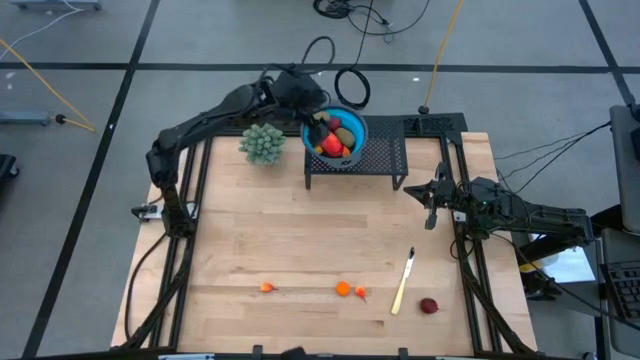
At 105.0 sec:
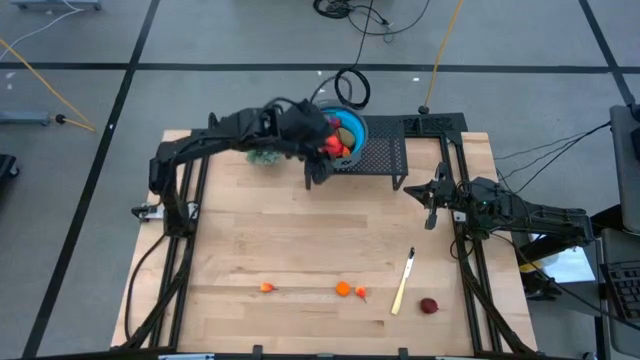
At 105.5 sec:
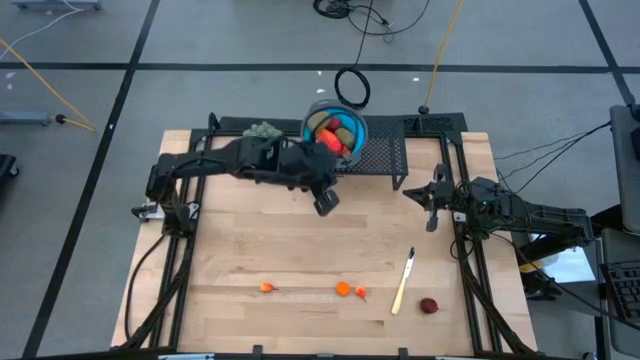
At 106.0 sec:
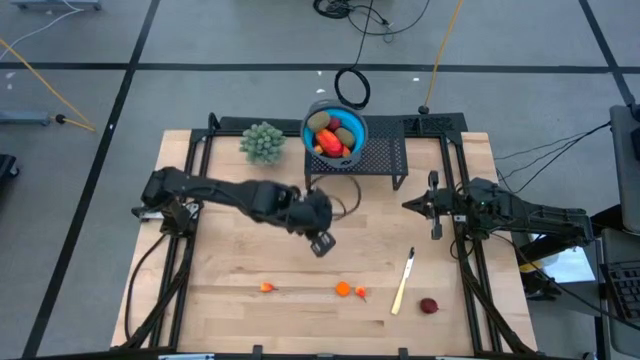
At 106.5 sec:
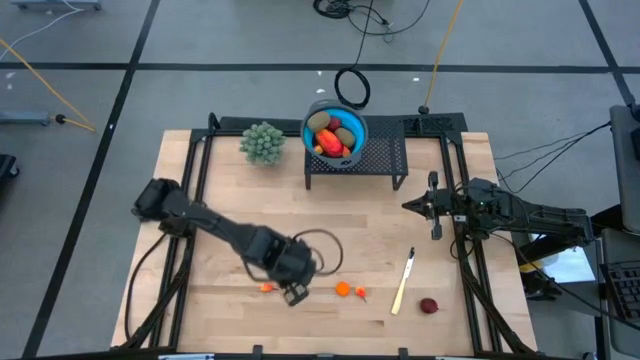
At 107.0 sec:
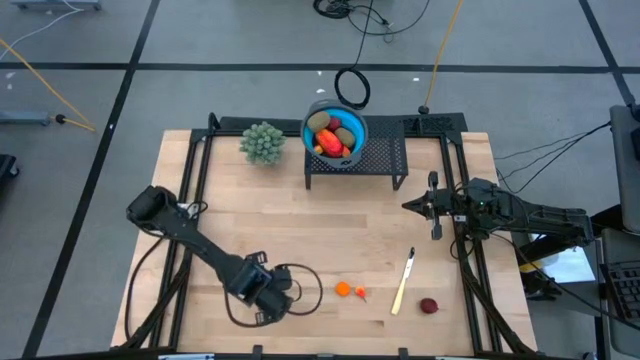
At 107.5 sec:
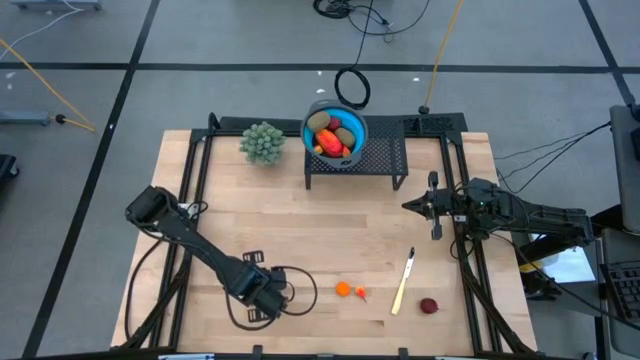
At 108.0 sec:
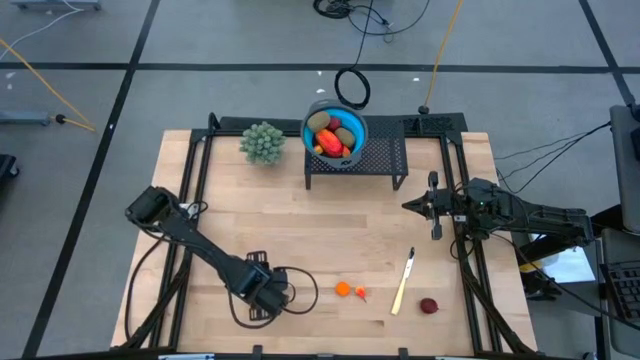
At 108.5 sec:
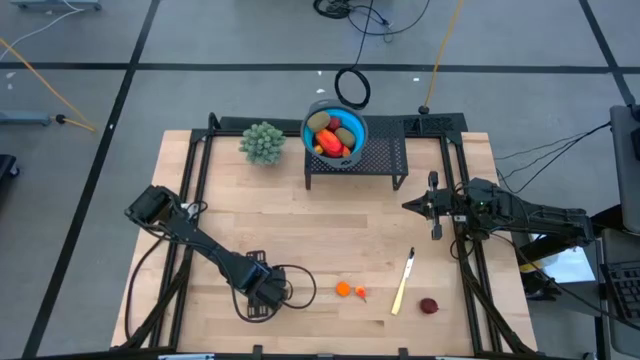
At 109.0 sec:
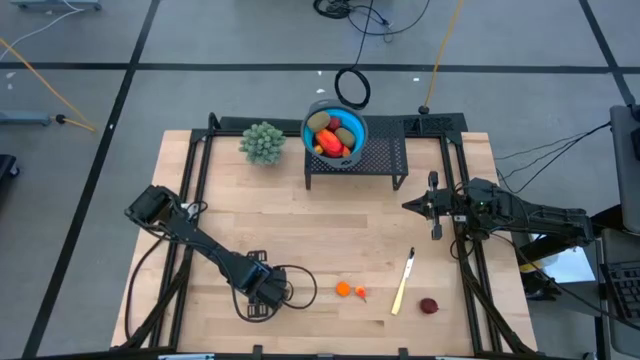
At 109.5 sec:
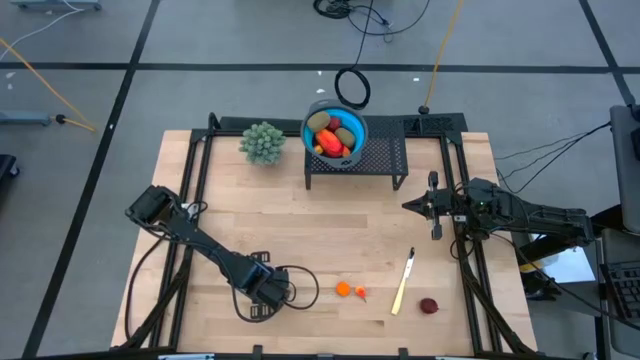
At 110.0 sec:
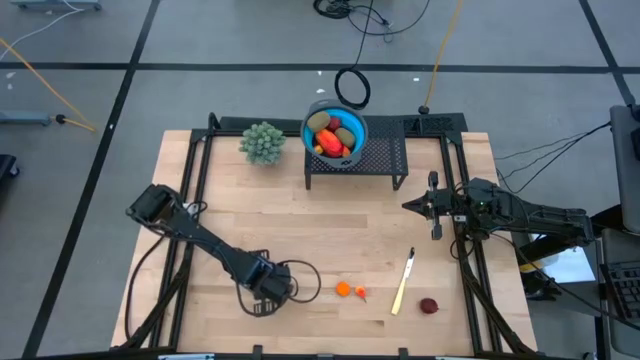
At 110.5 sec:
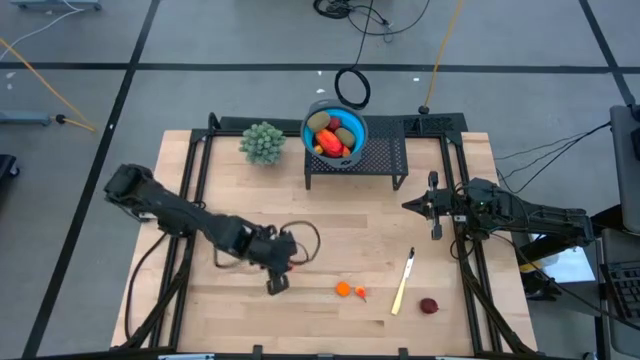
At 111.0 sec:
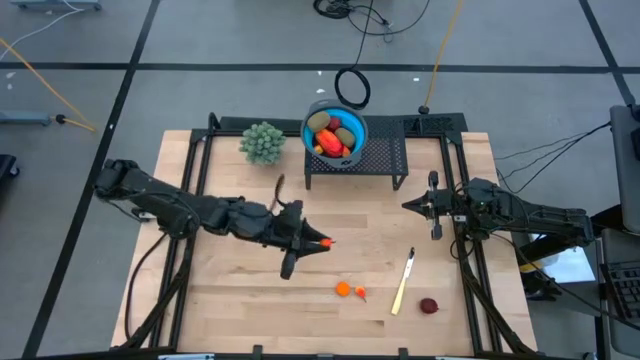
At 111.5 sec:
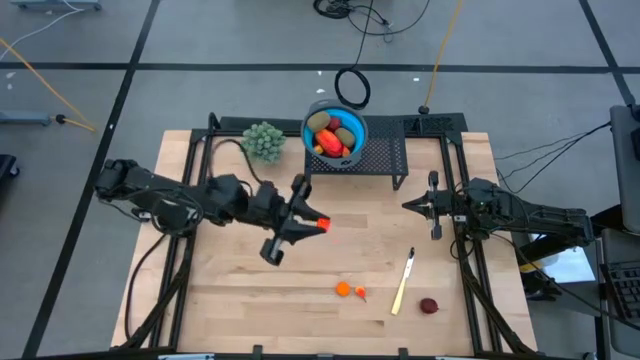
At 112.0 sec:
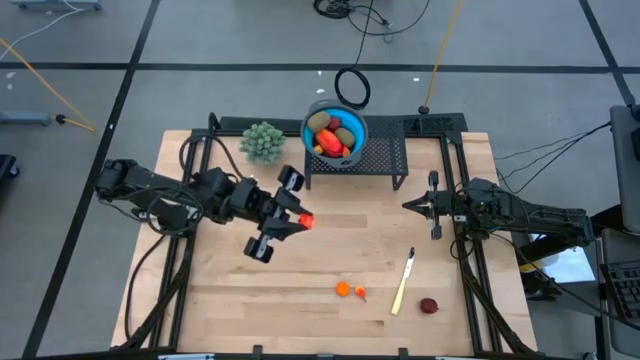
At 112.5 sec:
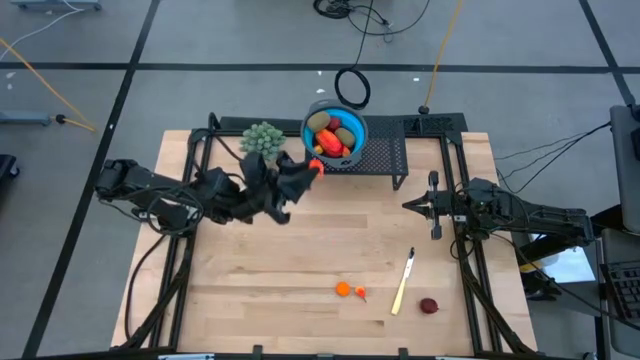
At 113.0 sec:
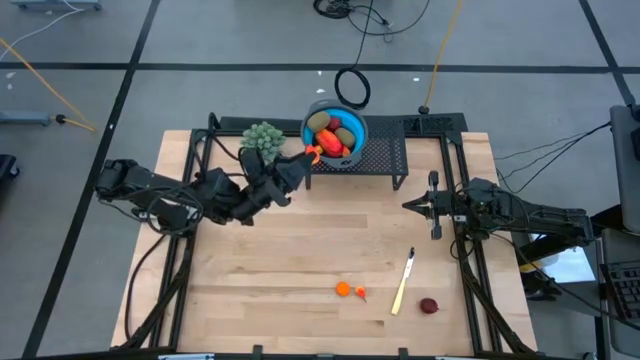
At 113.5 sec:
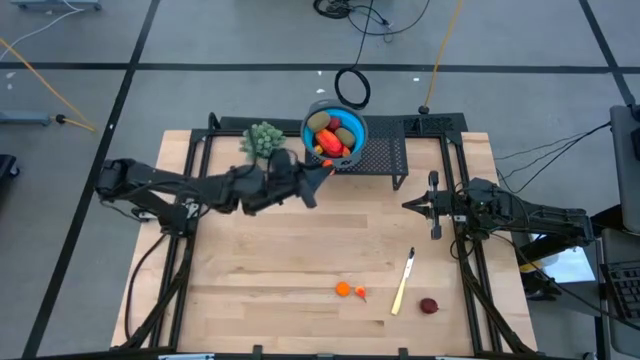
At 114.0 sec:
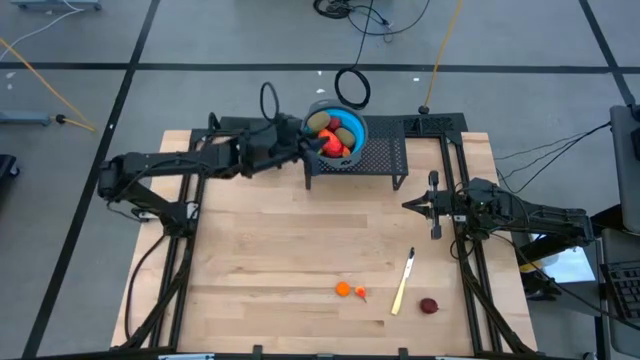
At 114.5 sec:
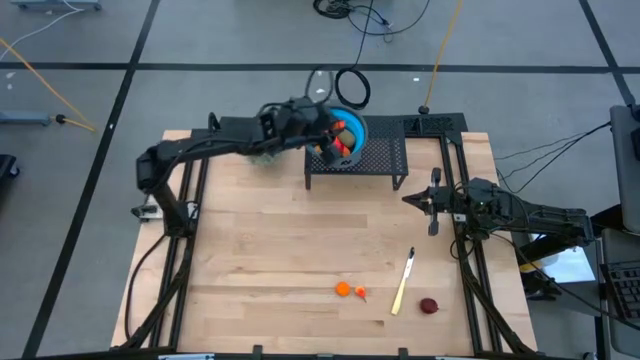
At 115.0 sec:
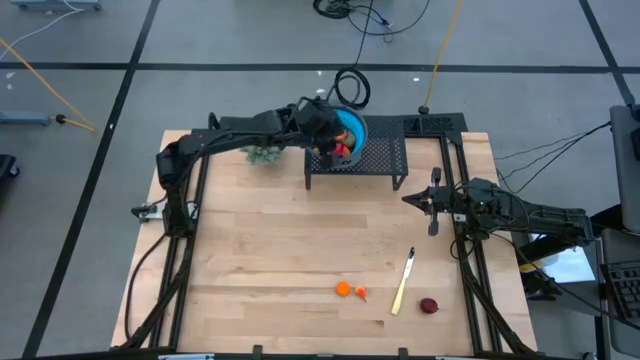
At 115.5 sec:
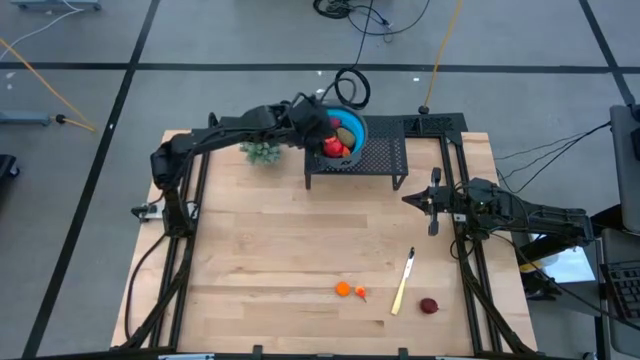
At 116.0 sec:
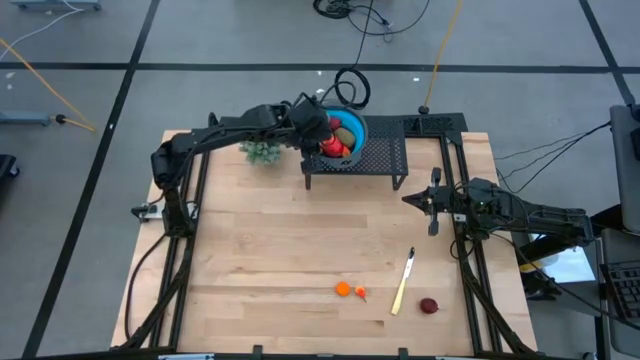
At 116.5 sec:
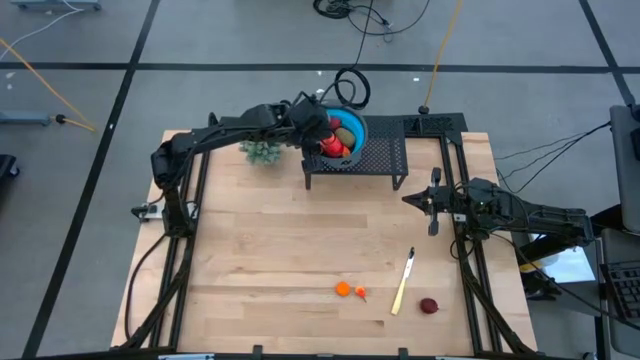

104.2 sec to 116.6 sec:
Task: Pick & Place Fruit
Put the peach into the blue strainer on the shelf

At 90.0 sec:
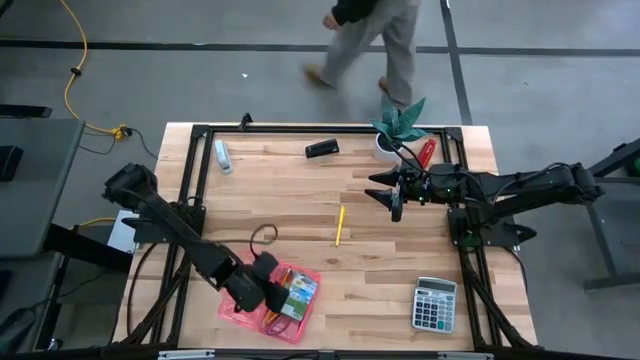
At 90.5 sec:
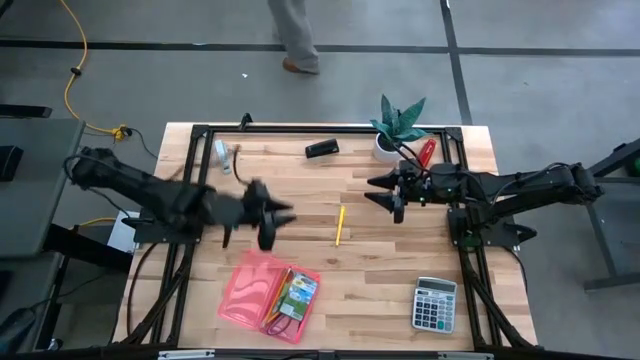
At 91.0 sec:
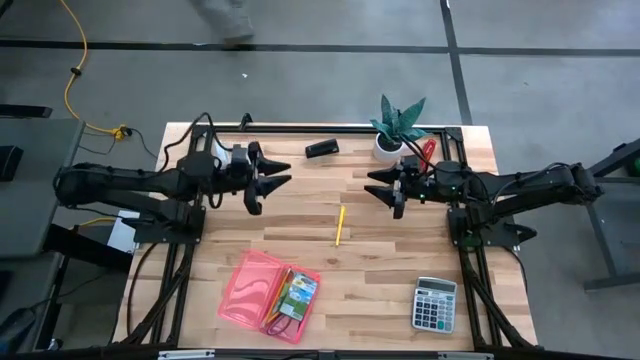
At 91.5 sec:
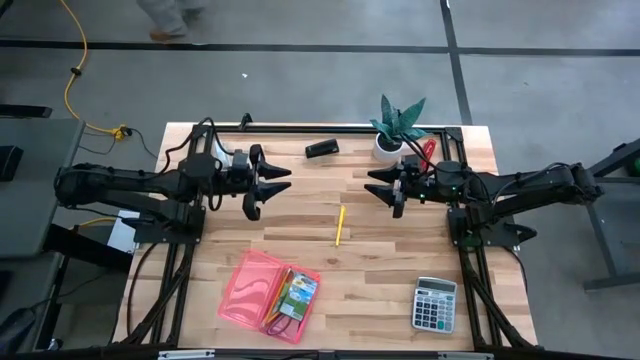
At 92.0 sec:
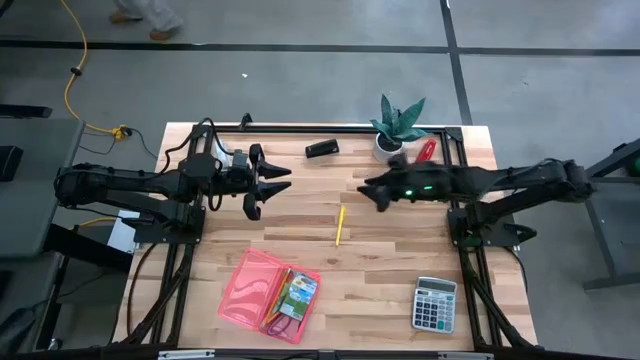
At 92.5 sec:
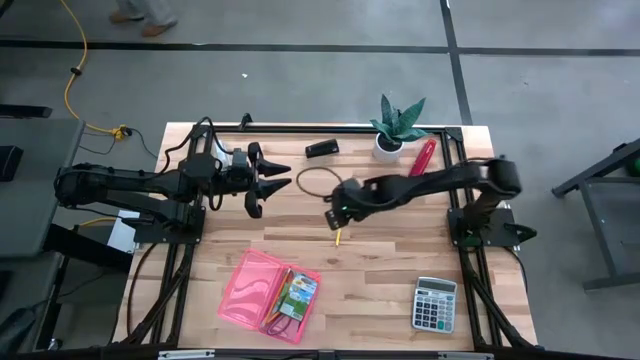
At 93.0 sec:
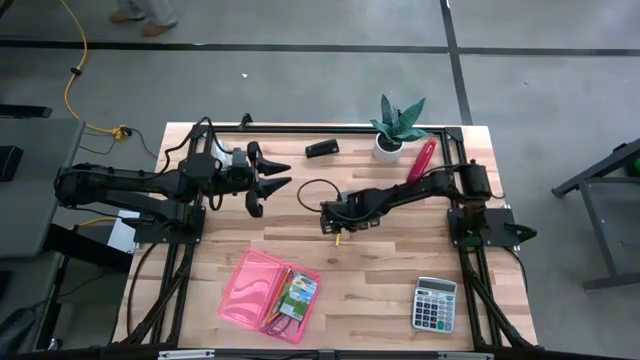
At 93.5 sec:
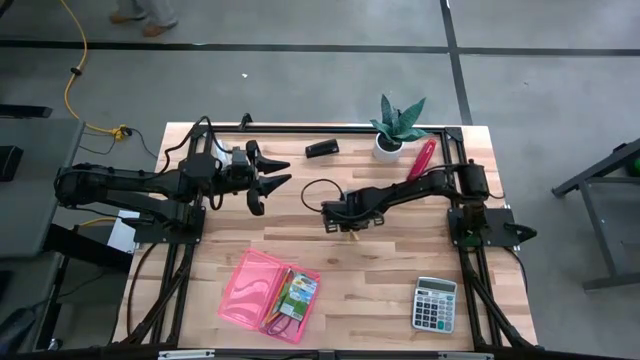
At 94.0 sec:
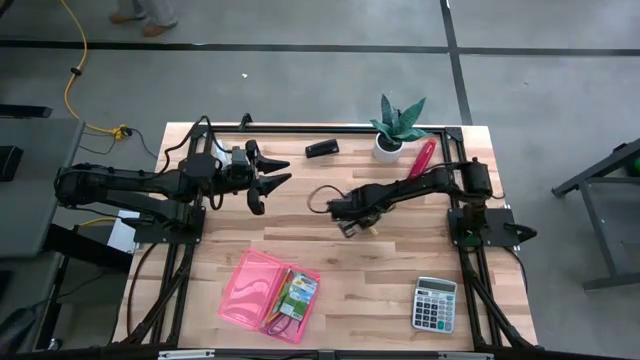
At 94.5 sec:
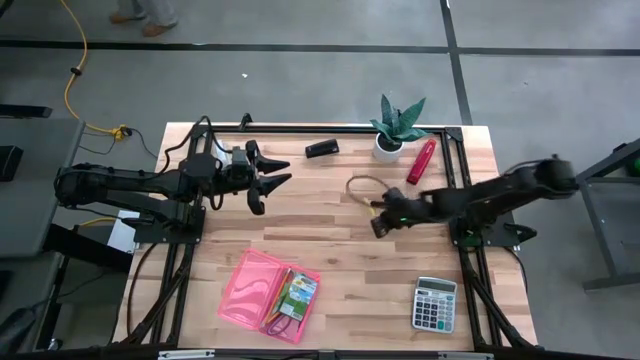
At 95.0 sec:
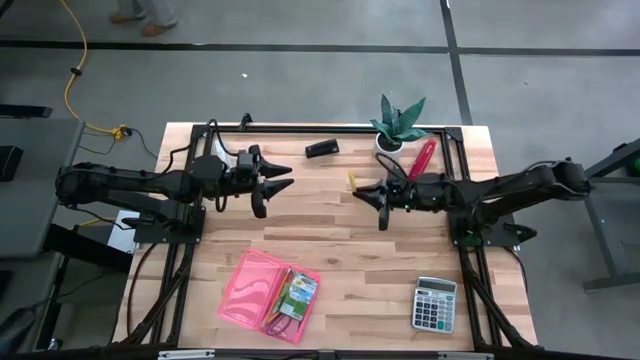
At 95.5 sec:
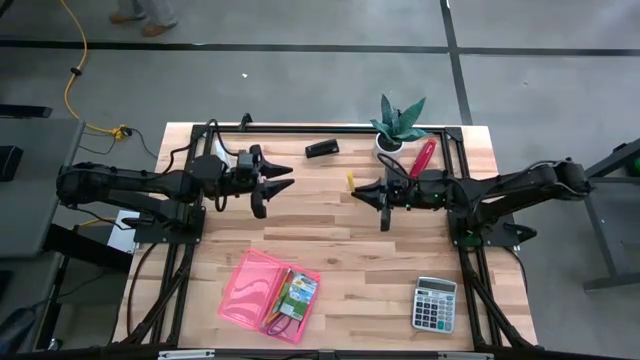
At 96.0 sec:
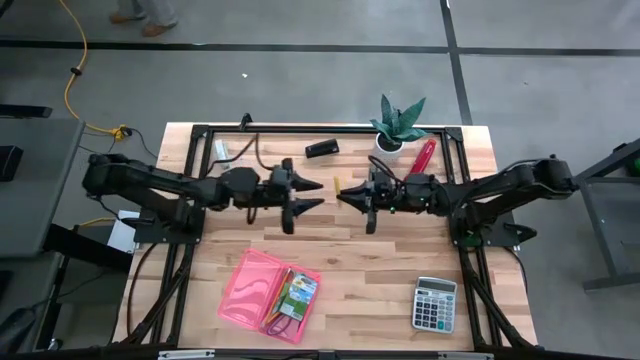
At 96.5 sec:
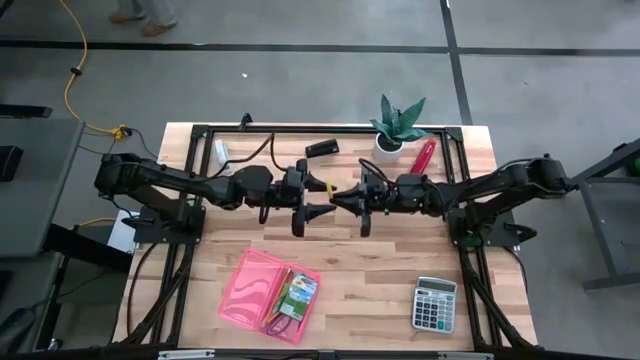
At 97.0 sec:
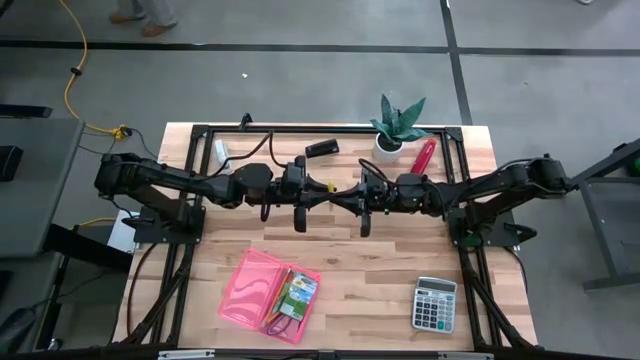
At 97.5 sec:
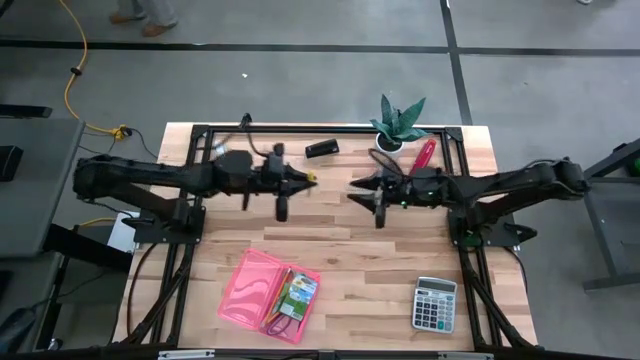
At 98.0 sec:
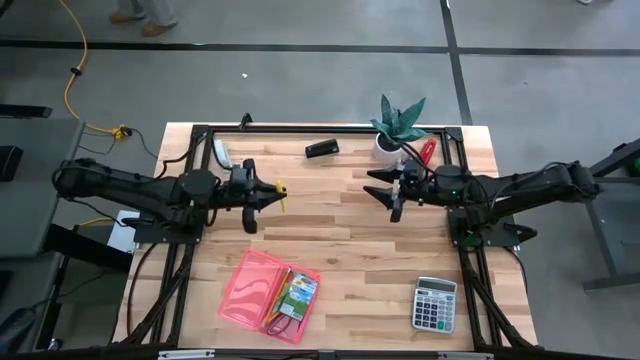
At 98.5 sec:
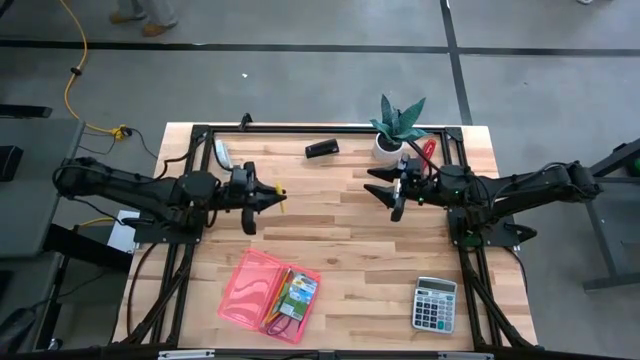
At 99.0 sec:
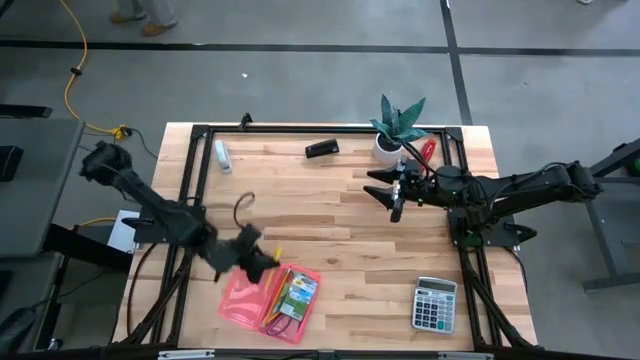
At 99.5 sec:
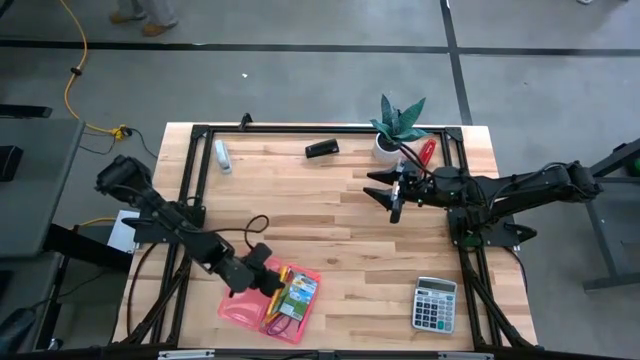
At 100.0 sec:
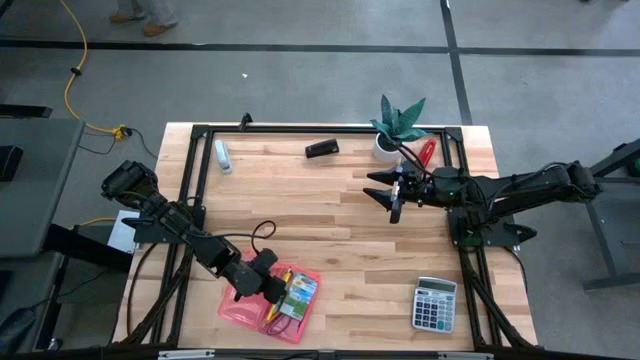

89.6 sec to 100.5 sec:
Task: Pack school essentials
Put the yellow pen into the supply box
